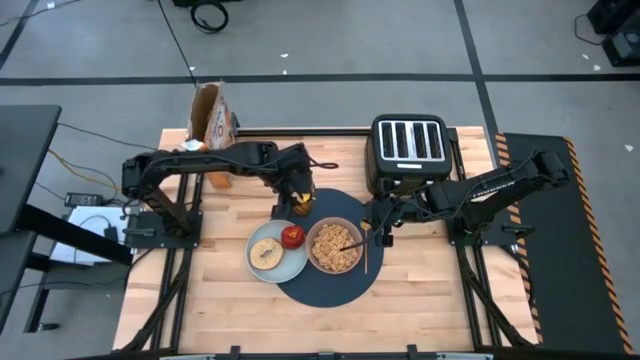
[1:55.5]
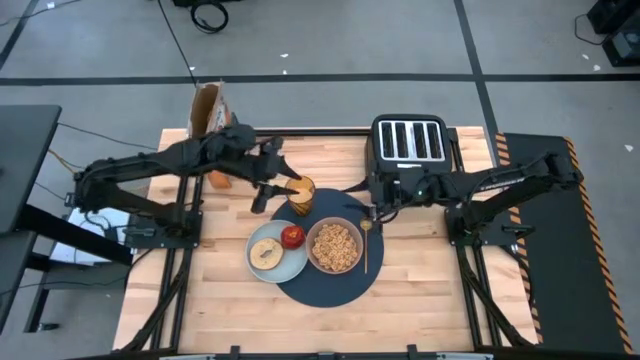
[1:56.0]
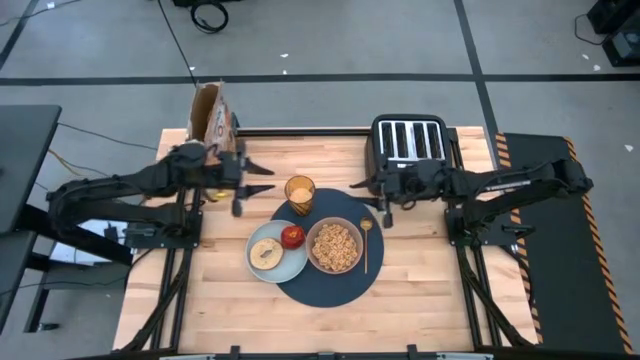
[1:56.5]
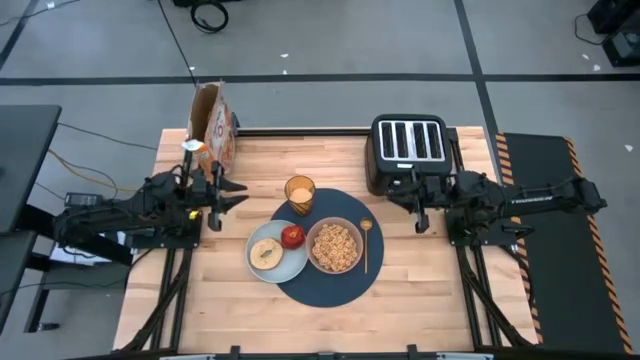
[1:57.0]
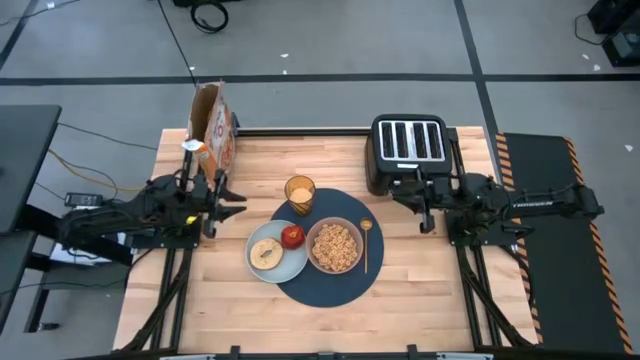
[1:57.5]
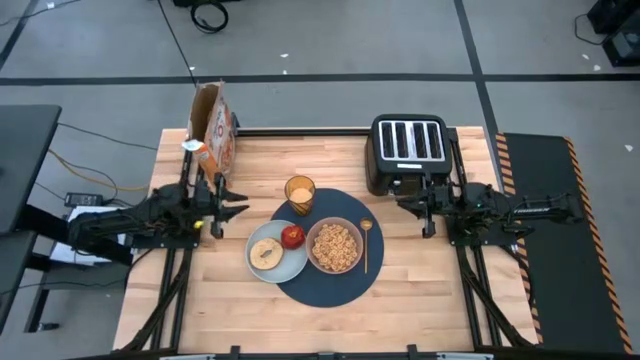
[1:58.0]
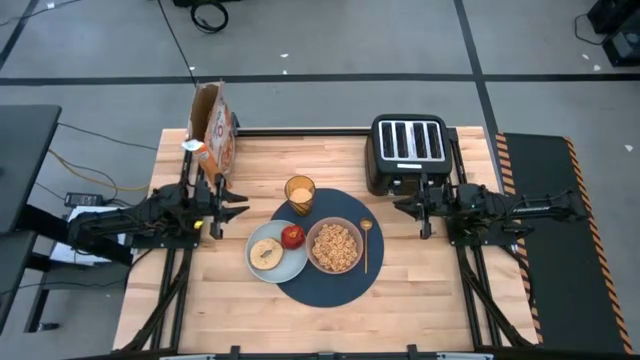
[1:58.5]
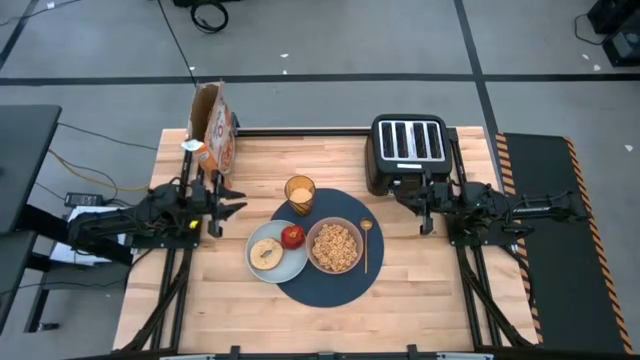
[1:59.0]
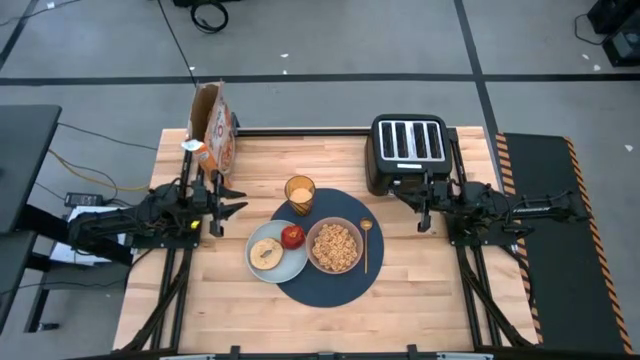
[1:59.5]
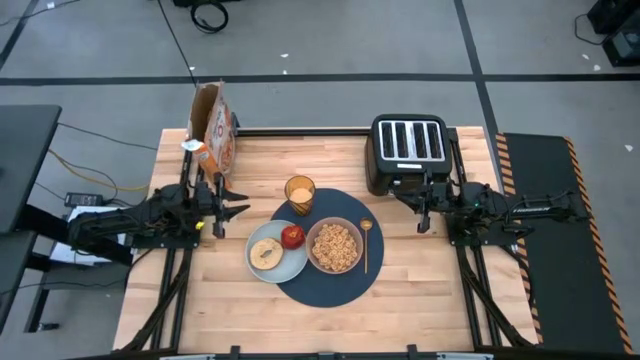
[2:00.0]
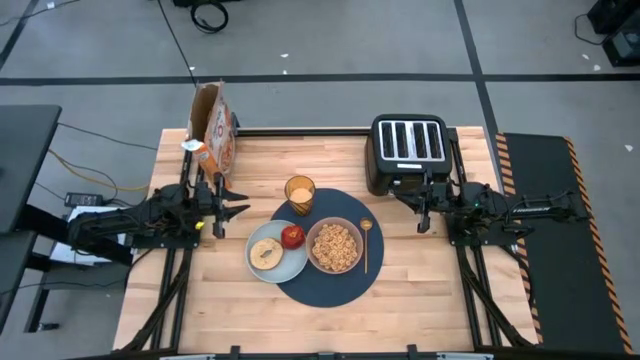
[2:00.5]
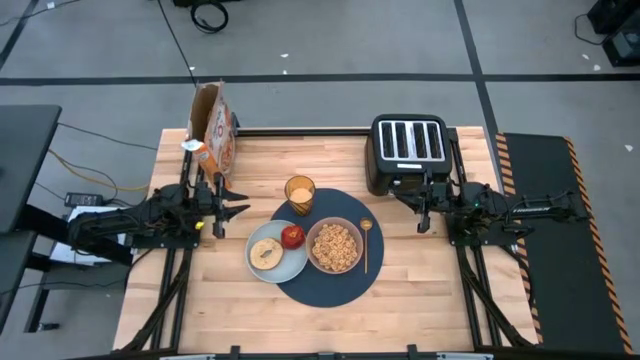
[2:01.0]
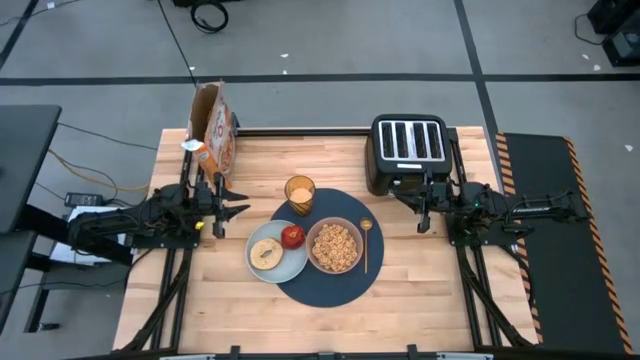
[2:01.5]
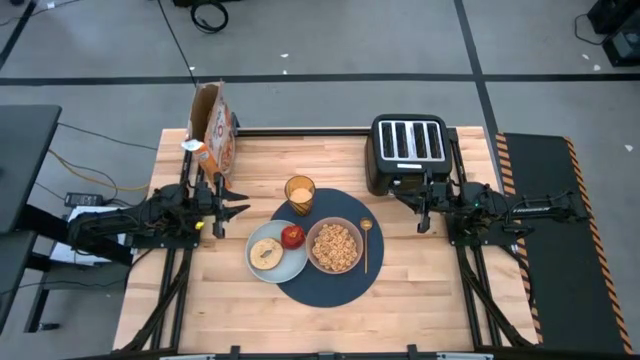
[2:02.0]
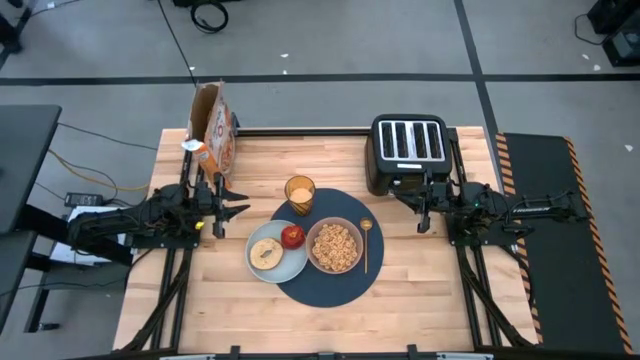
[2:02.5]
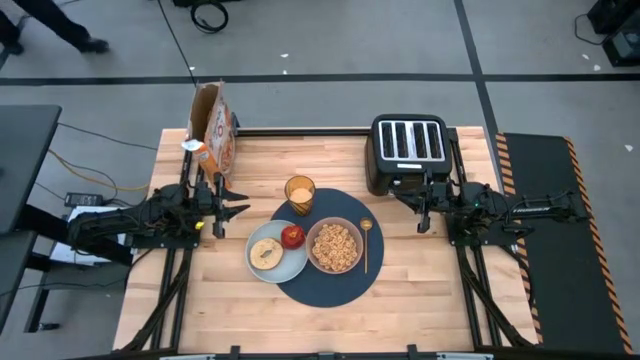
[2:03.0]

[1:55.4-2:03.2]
Task: Arrange a breakfast setting
Return to Home Position

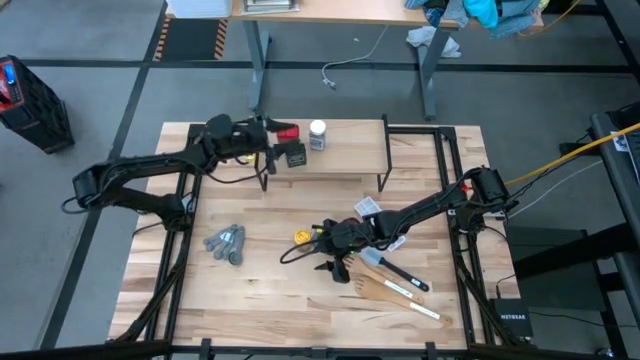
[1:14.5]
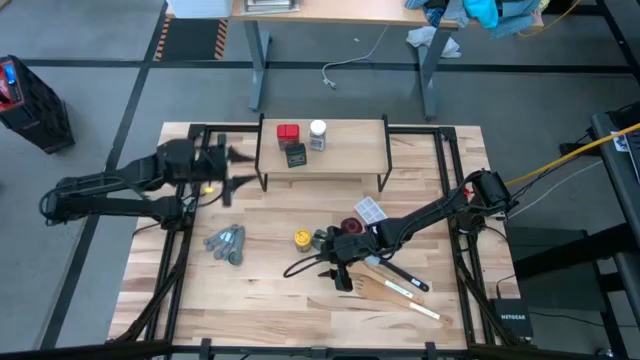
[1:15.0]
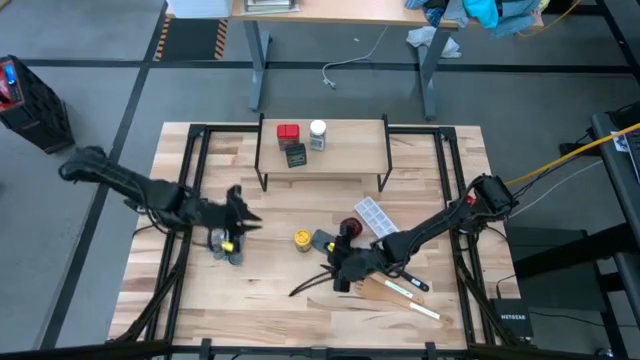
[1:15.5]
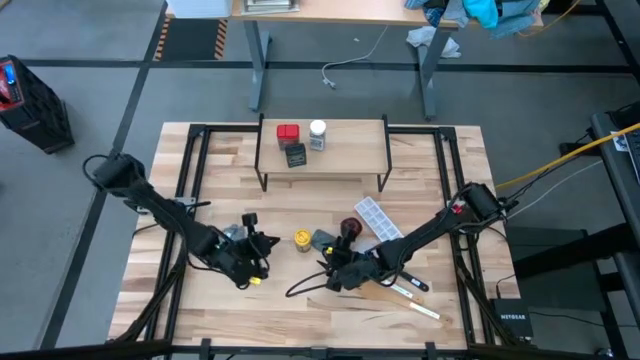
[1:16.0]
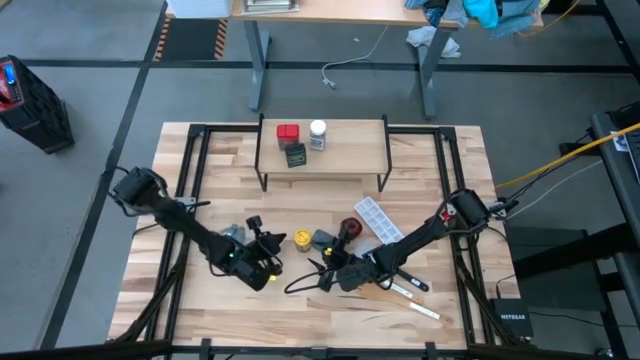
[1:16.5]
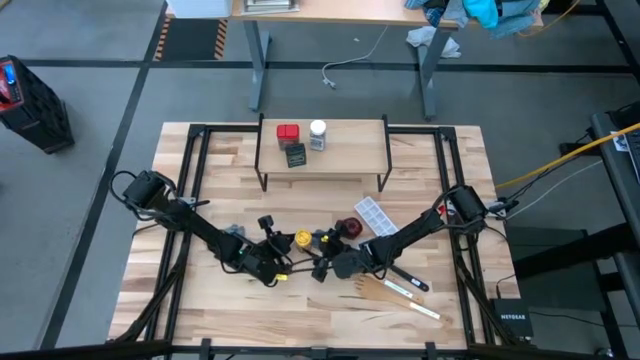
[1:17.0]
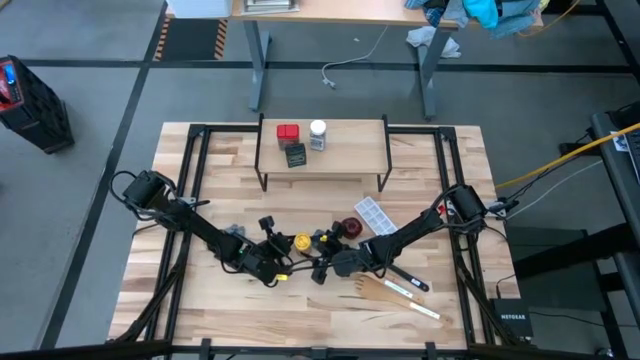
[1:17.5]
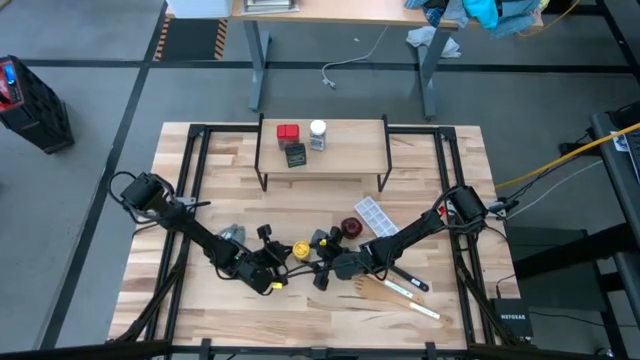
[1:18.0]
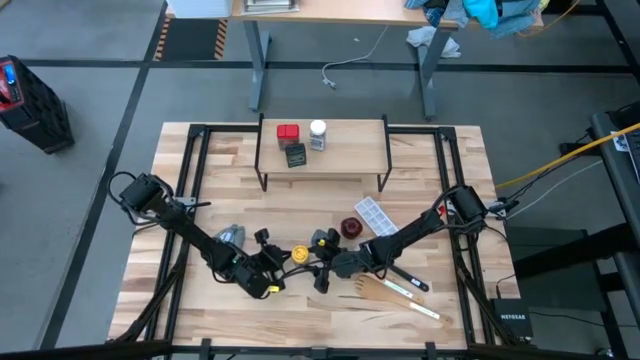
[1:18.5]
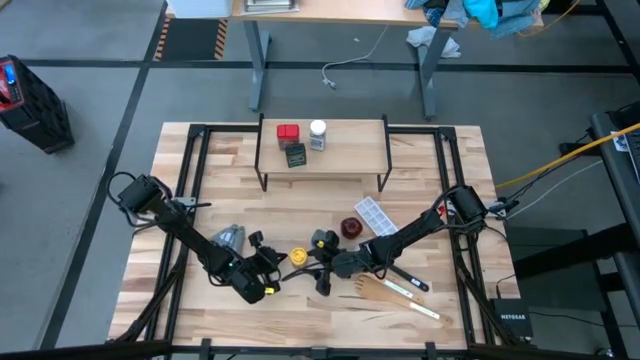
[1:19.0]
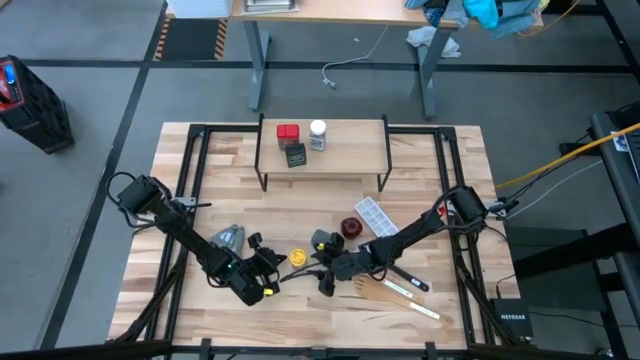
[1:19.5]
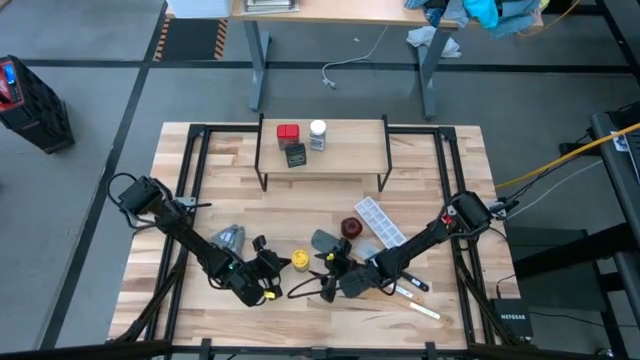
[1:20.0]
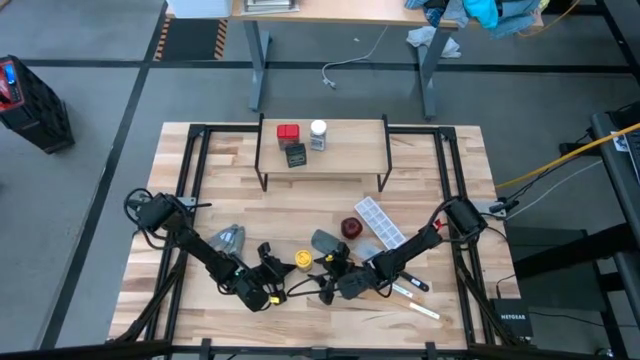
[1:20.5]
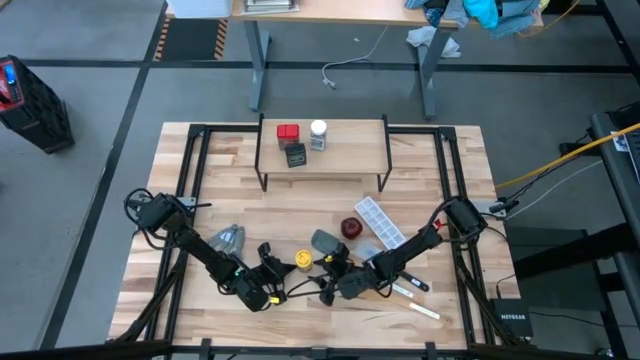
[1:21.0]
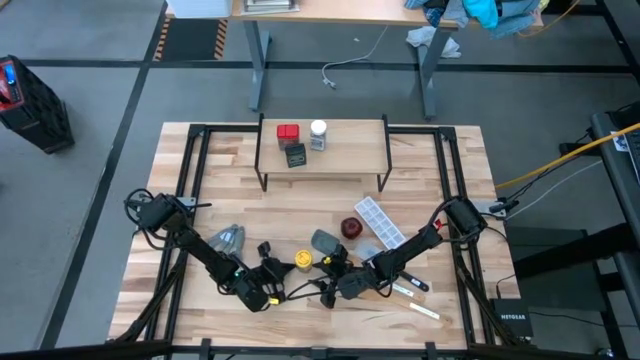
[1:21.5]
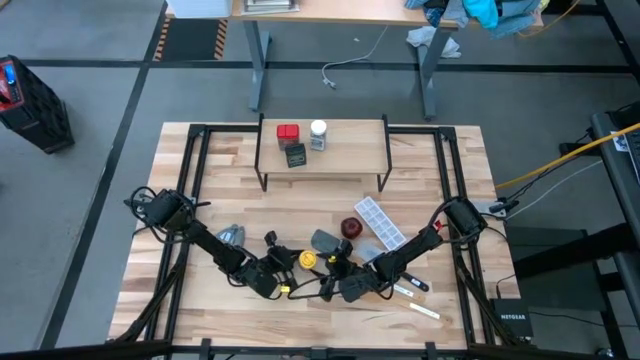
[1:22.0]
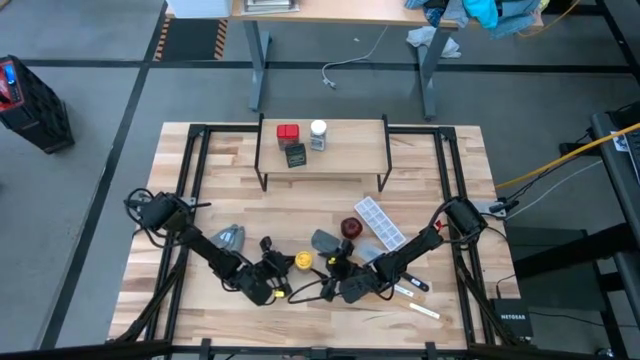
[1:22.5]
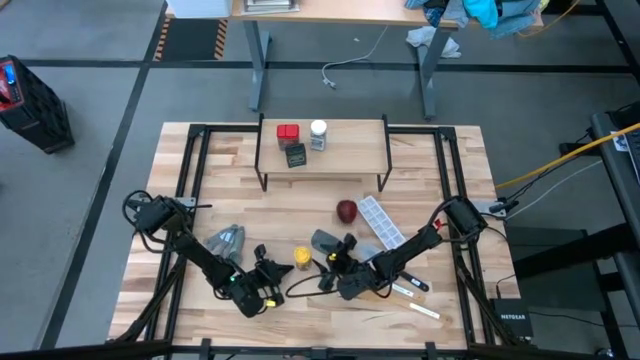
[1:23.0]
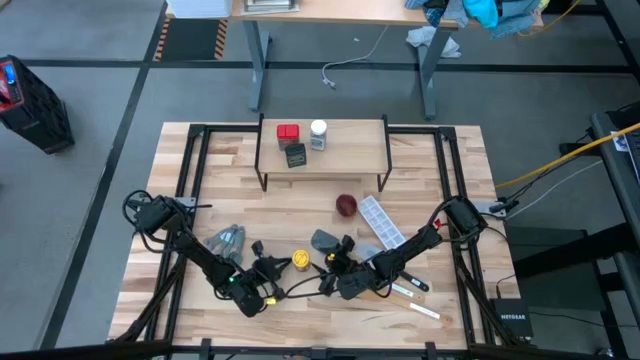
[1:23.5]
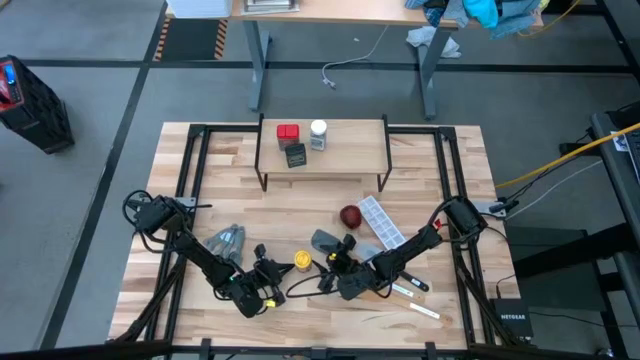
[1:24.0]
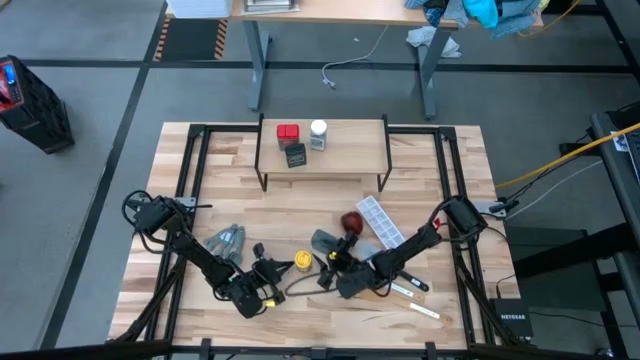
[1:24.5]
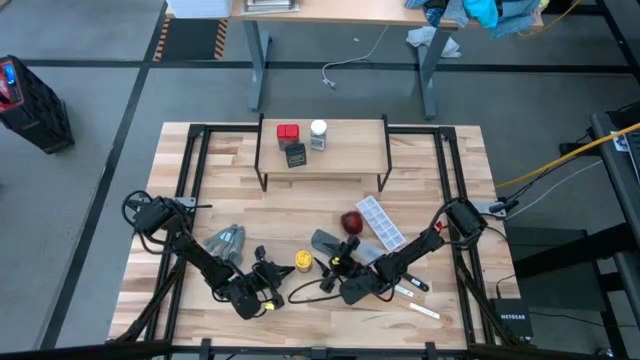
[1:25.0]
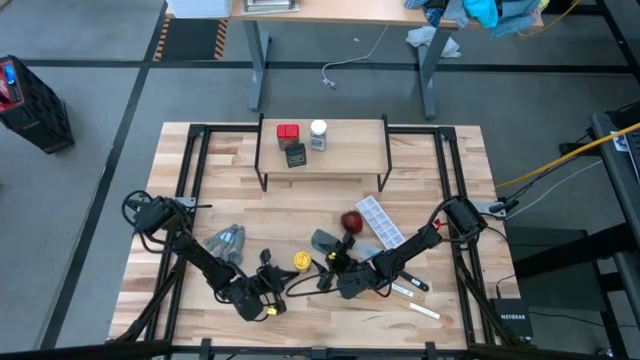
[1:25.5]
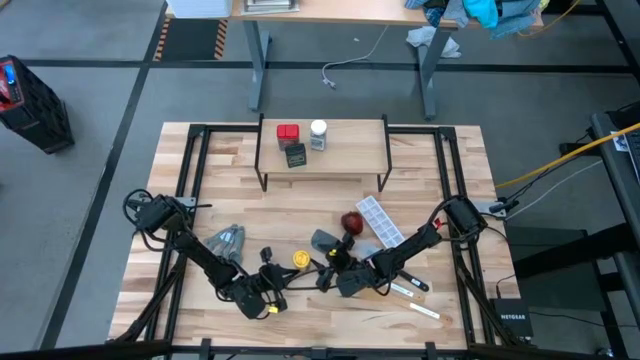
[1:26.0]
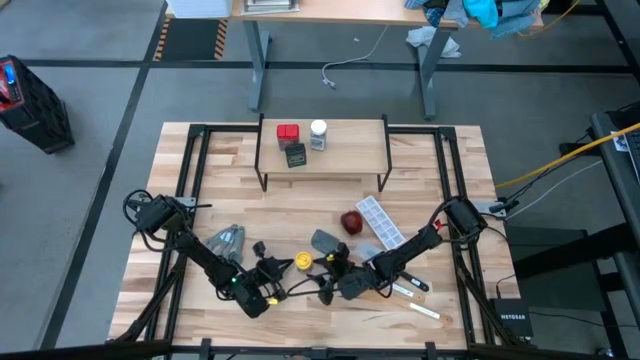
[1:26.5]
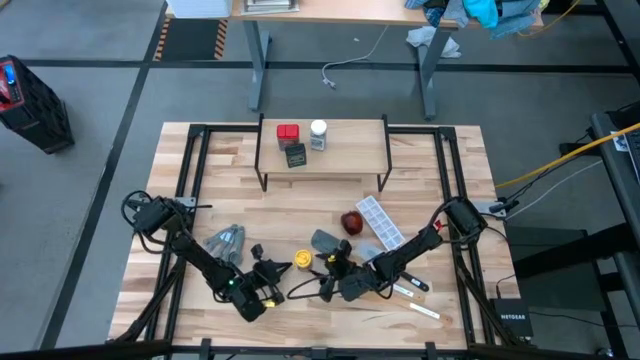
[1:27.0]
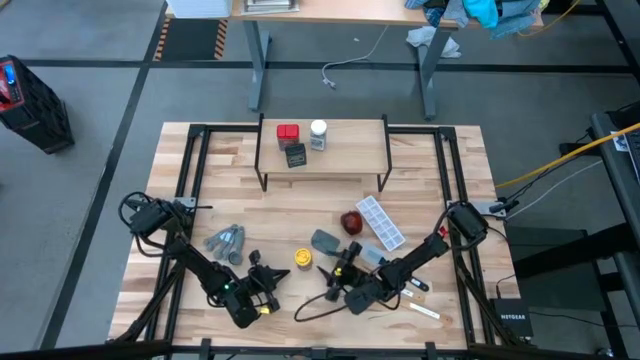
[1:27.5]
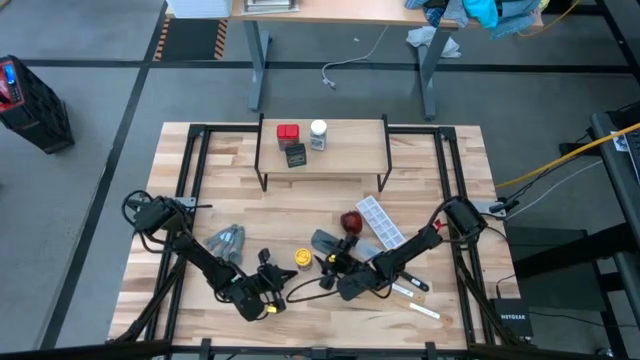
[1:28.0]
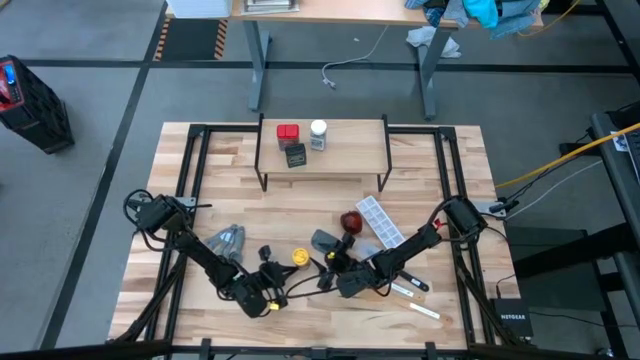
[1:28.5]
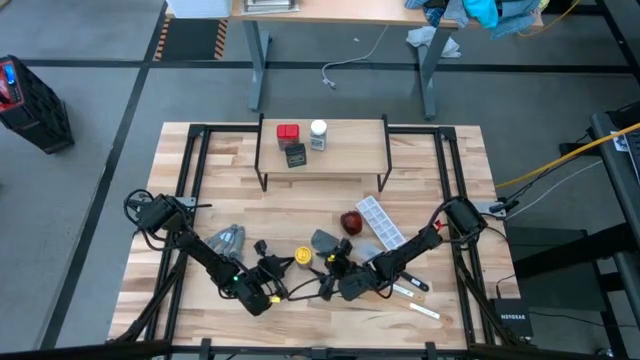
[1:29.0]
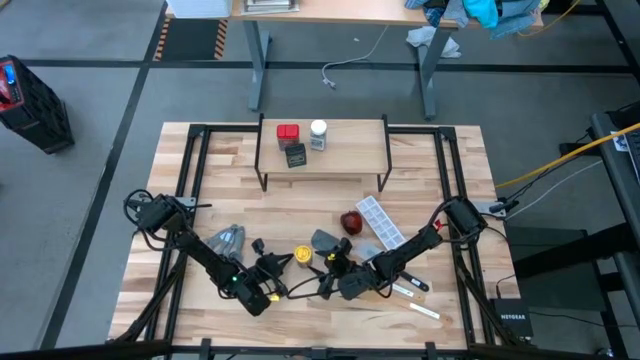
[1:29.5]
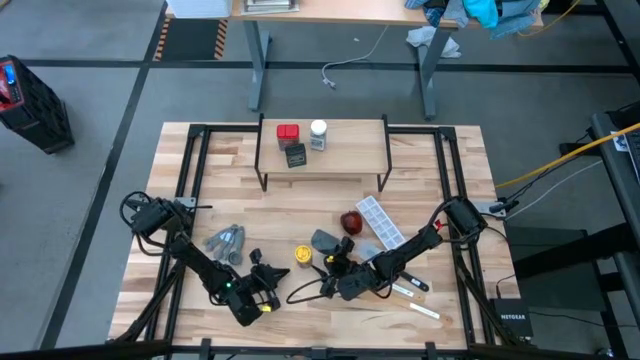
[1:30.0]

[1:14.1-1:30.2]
Task: Shelf spices
Put the yellow seasoning bottle on the shelf
